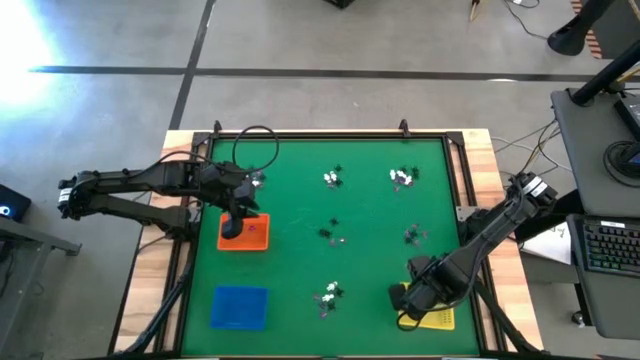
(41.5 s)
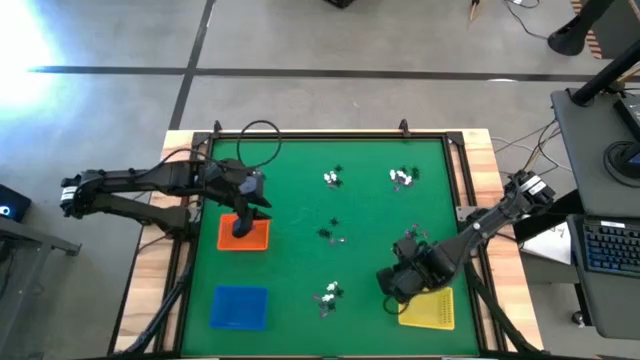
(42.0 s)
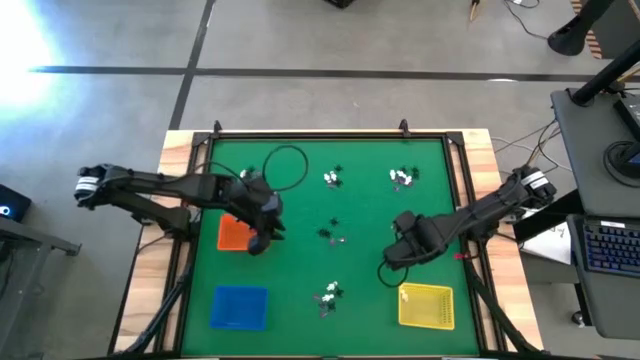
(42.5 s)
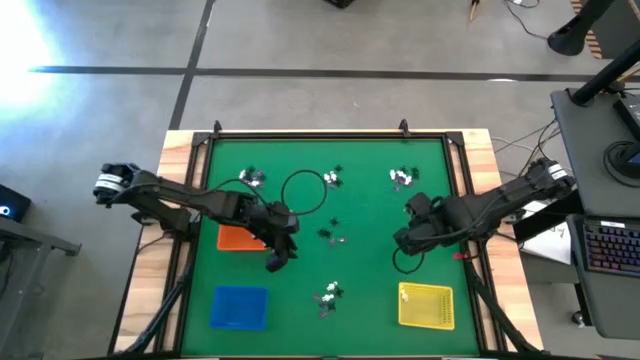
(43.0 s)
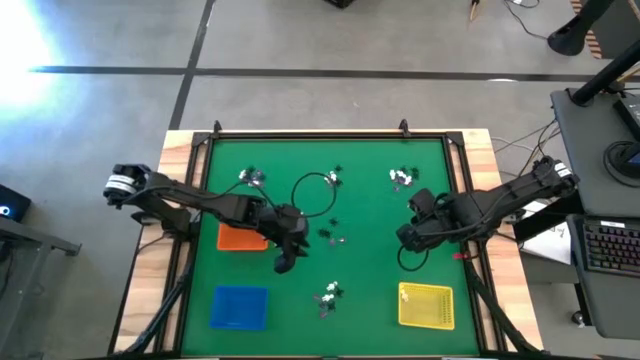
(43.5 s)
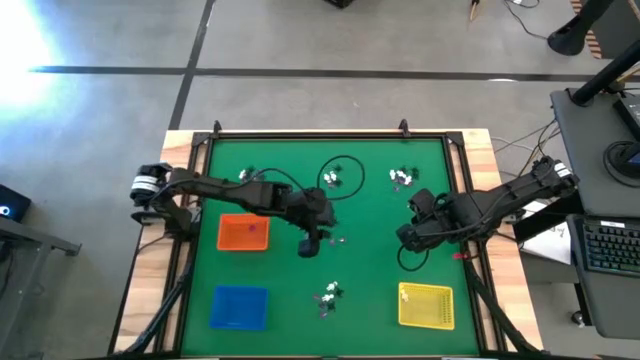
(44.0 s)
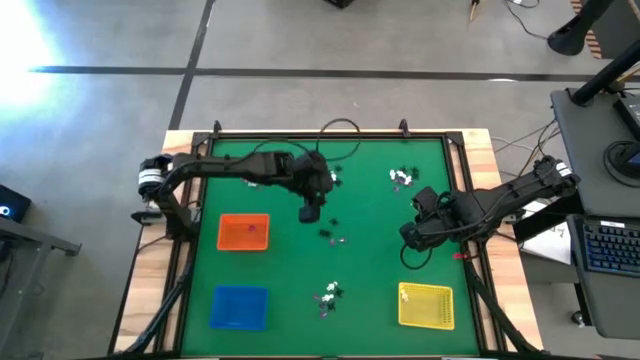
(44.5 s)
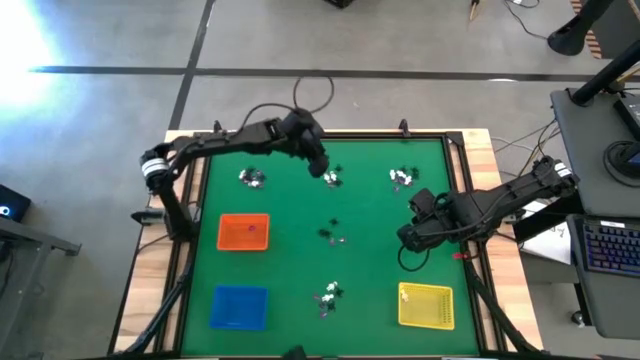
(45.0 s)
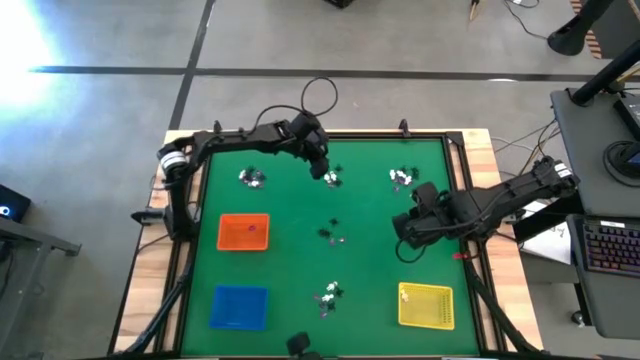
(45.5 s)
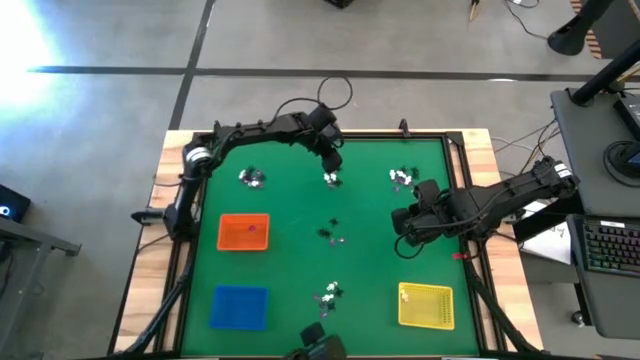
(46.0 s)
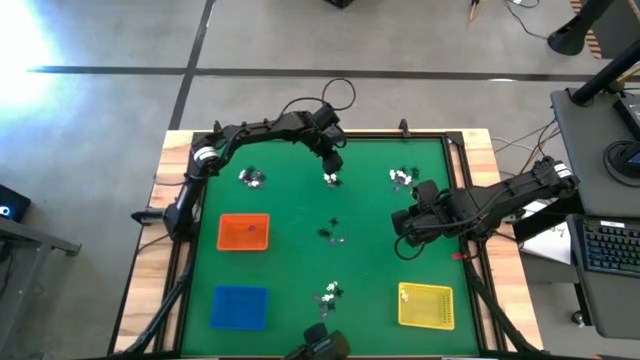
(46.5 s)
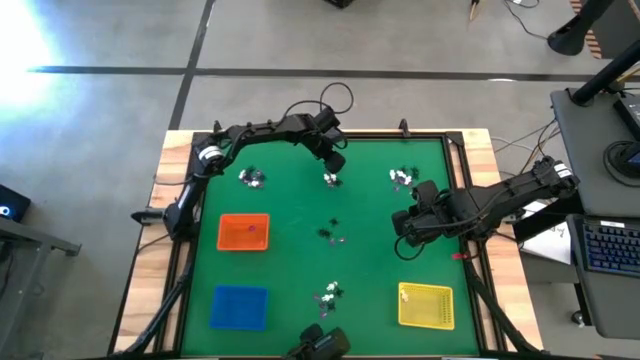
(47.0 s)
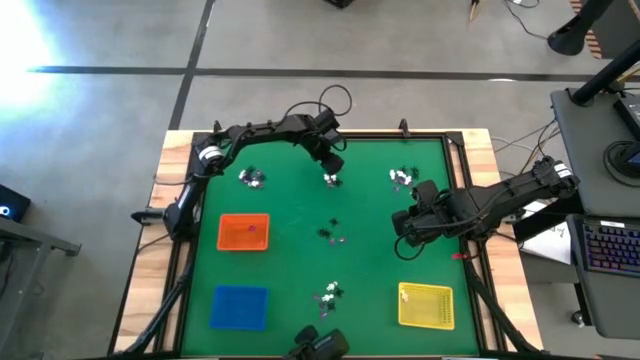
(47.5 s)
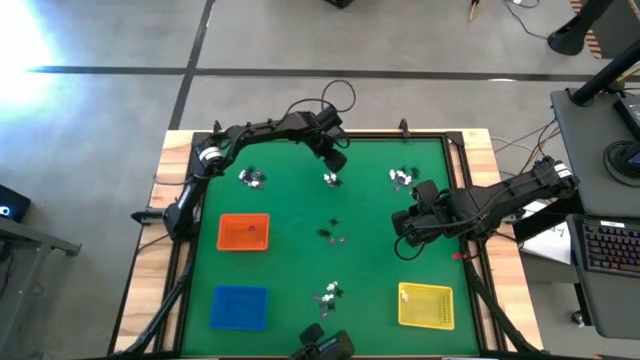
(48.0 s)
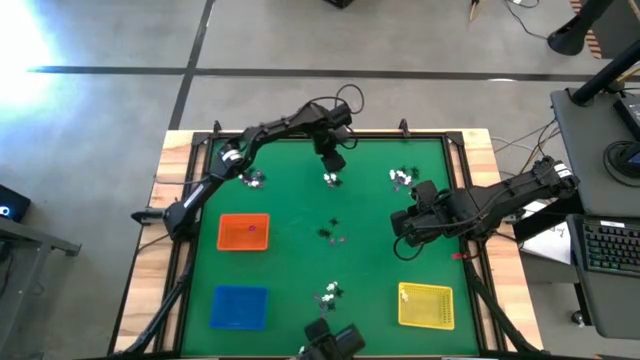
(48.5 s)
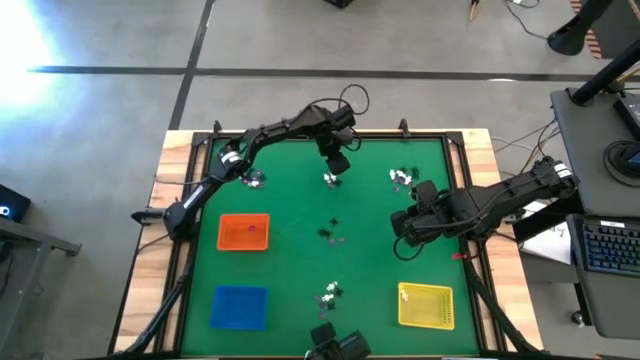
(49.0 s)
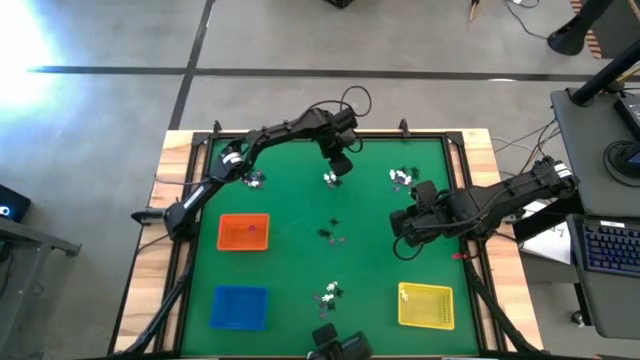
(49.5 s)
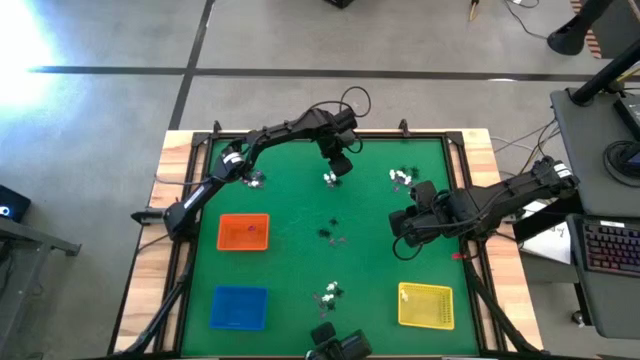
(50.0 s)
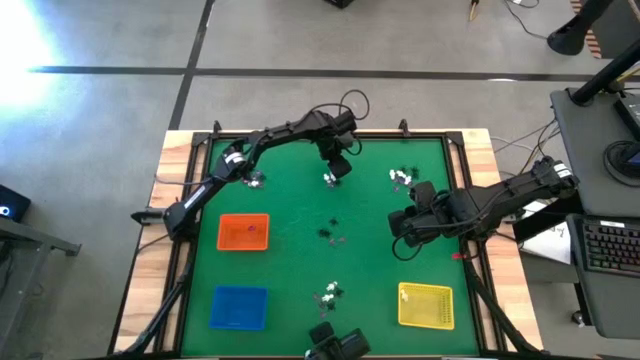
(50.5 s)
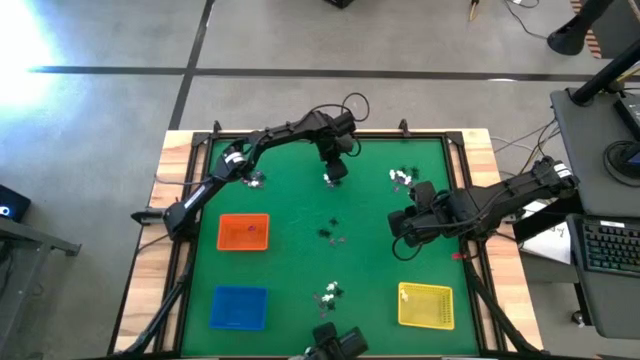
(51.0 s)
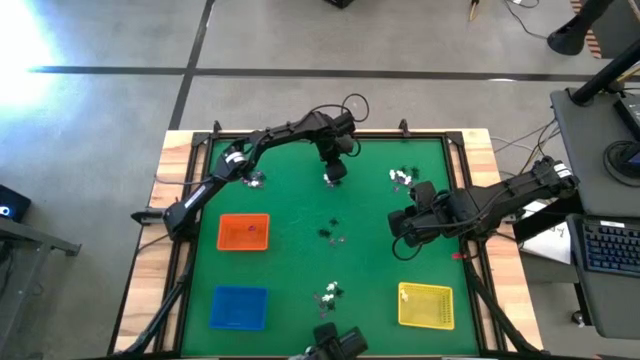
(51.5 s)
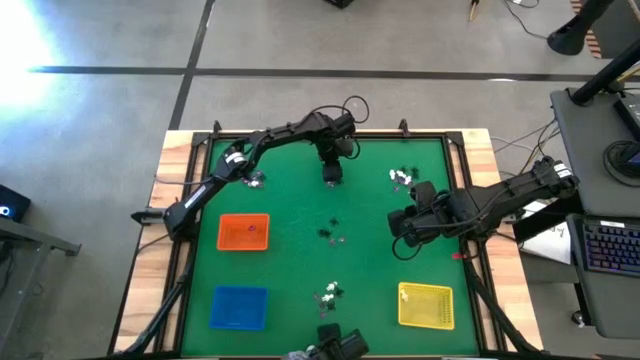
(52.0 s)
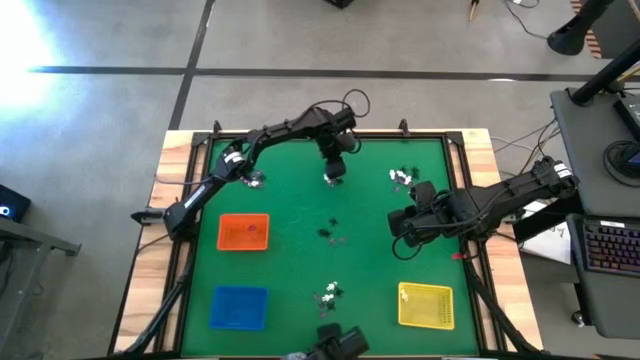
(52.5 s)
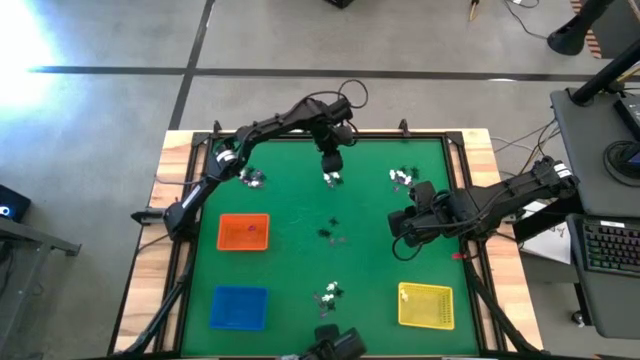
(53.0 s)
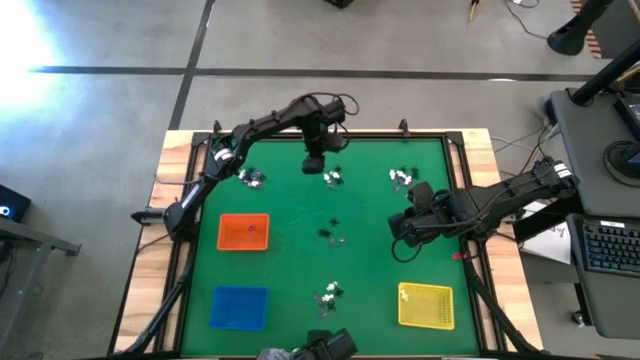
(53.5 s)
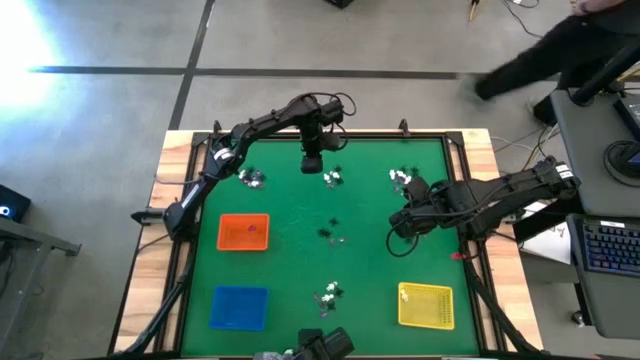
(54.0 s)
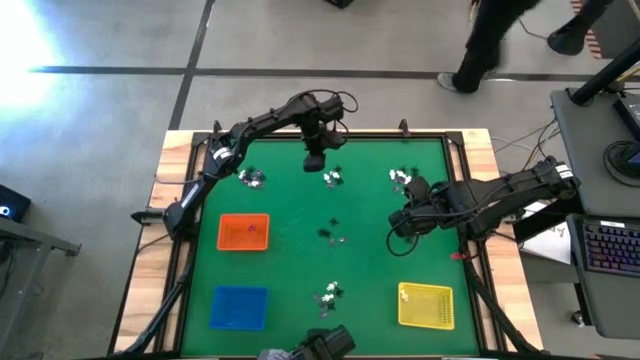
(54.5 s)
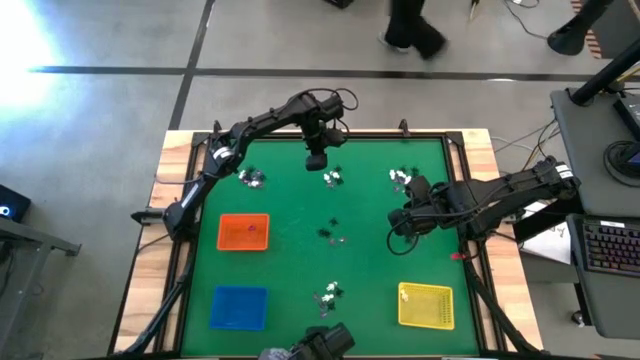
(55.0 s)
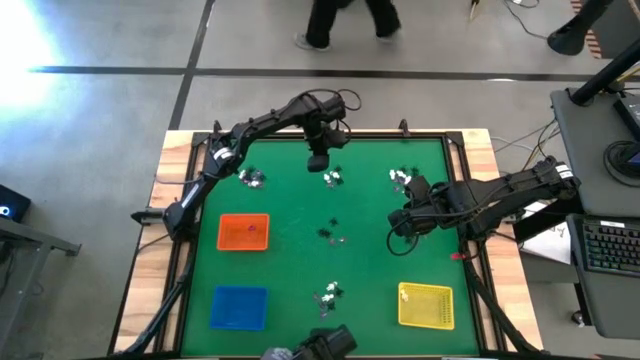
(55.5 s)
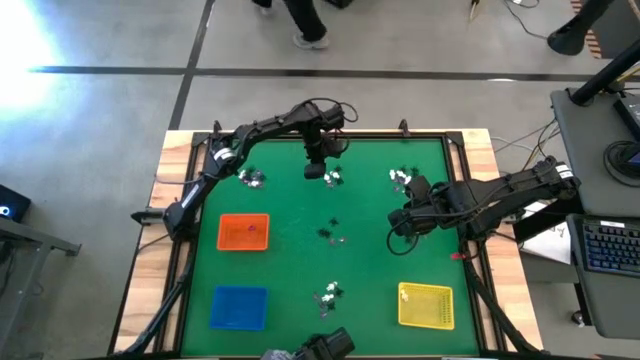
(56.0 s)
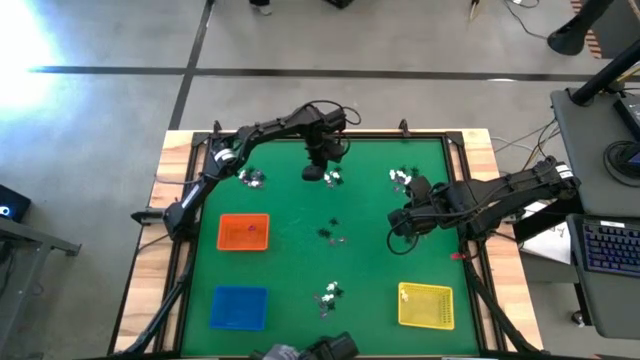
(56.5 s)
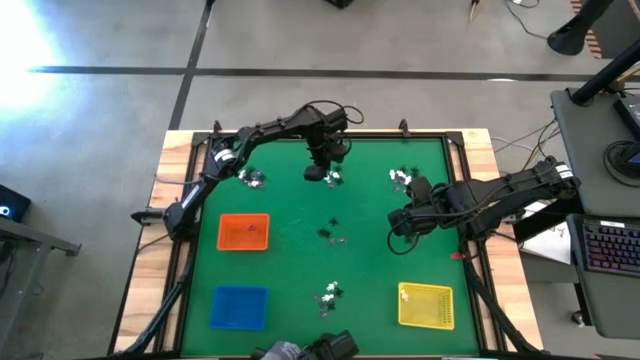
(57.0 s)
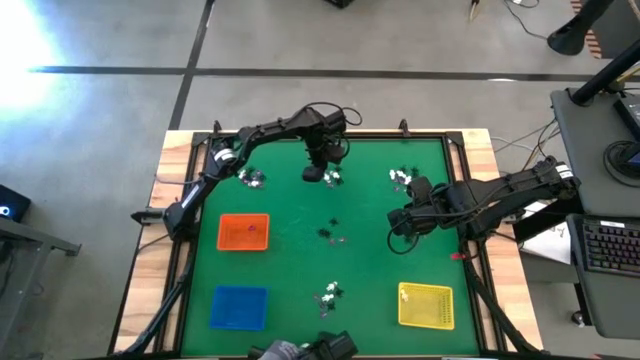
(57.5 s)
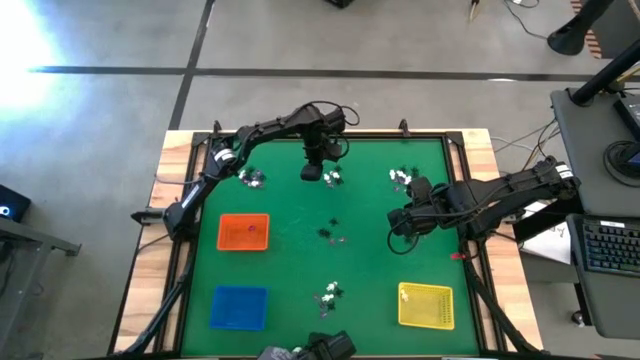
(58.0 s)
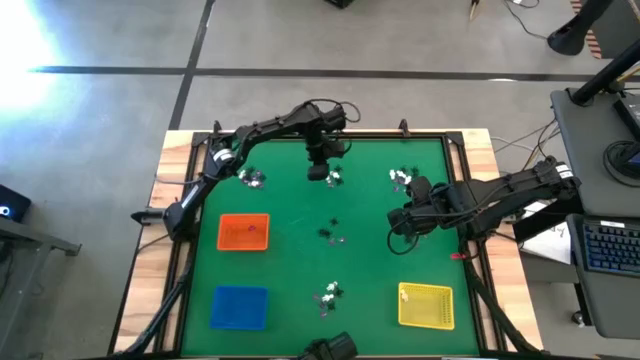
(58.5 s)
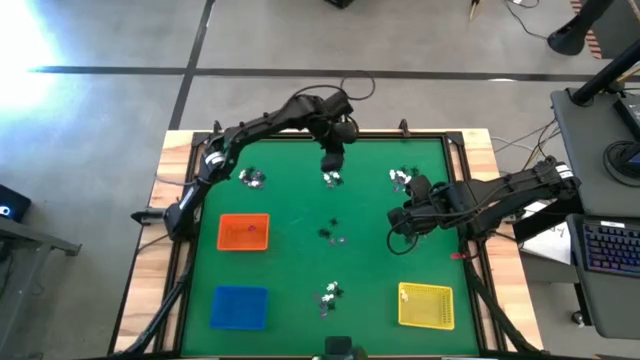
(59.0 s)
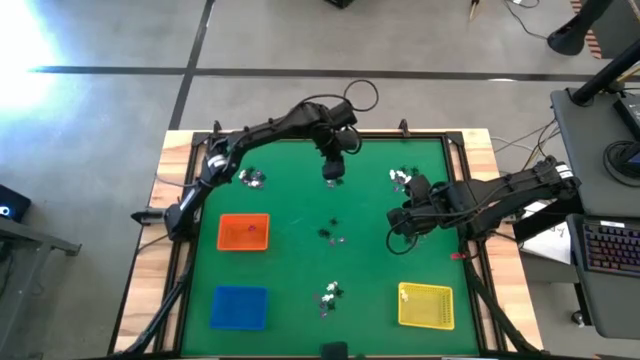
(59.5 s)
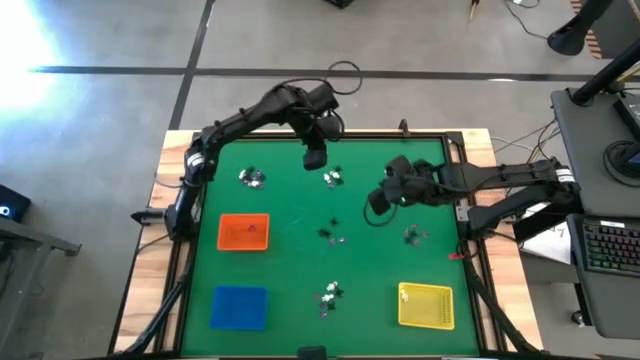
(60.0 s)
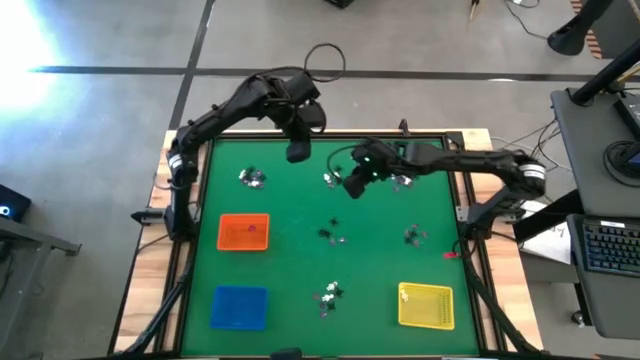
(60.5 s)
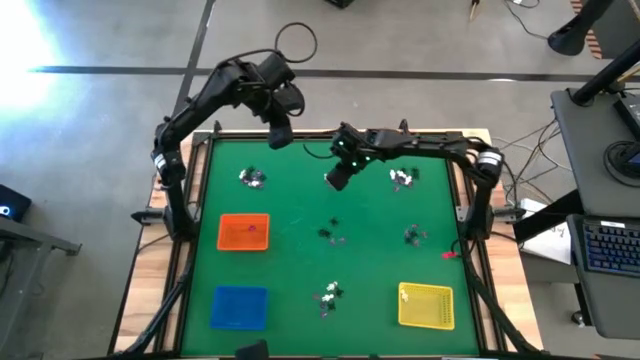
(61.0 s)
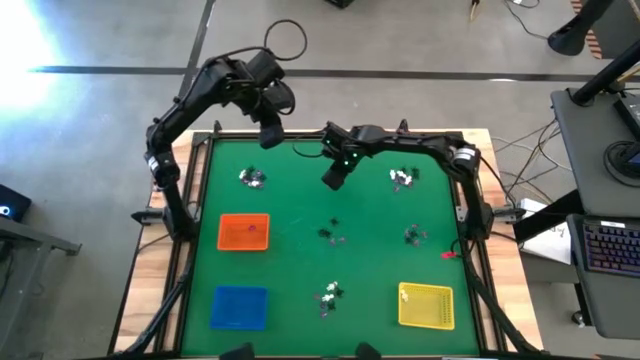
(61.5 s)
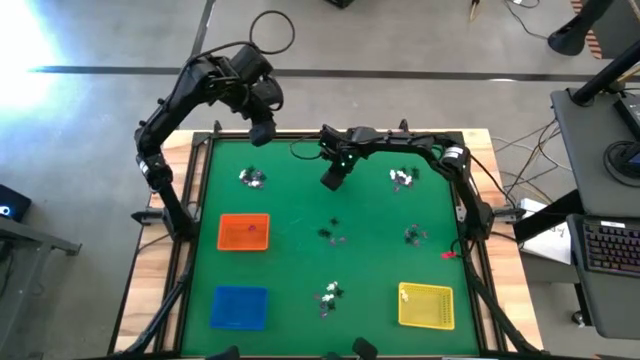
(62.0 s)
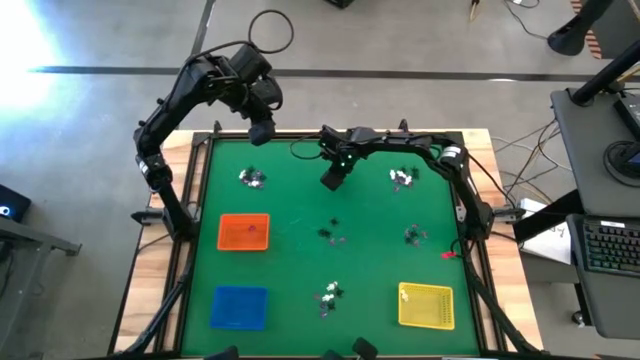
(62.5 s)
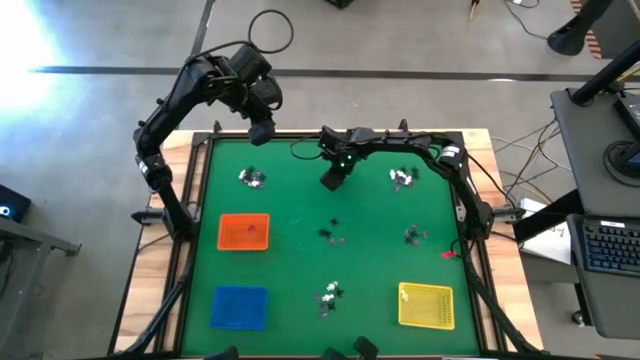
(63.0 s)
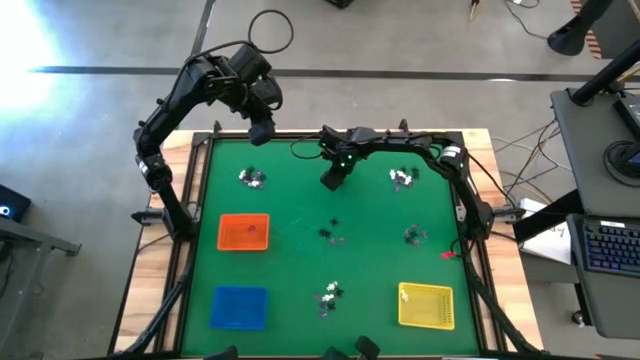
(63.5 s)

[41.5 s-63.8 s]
Task: Sort Halloween decoration
Put the white skeleton toy into the yellow bin
